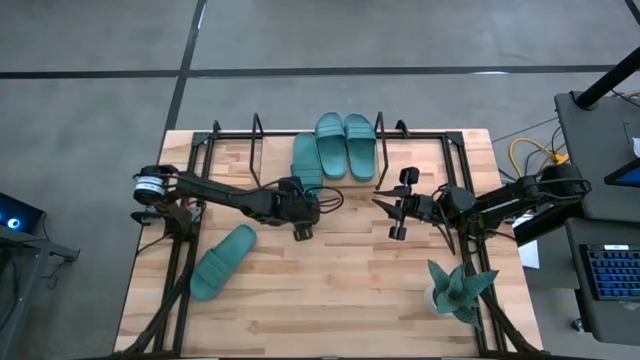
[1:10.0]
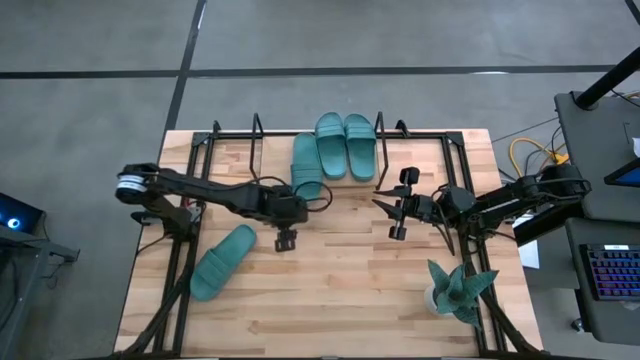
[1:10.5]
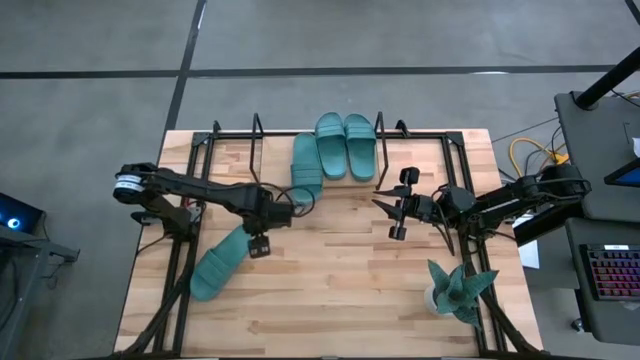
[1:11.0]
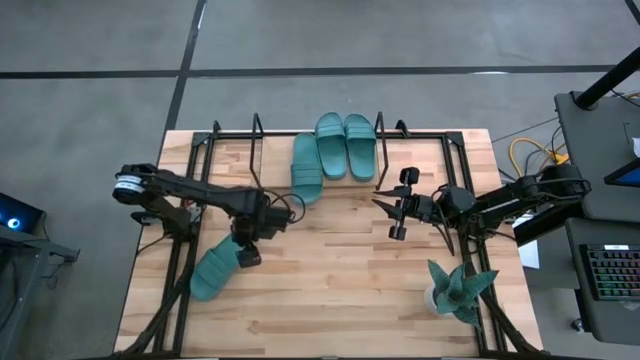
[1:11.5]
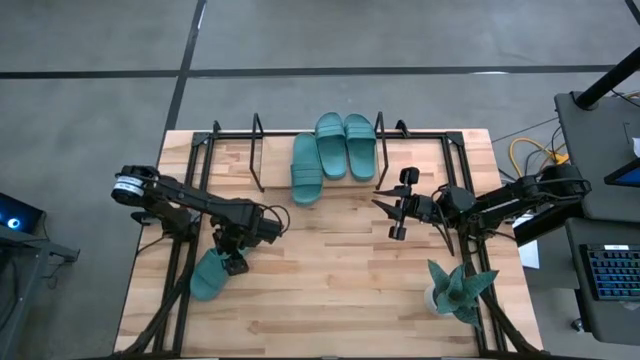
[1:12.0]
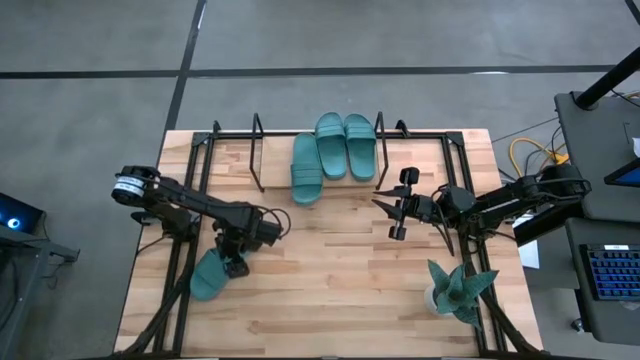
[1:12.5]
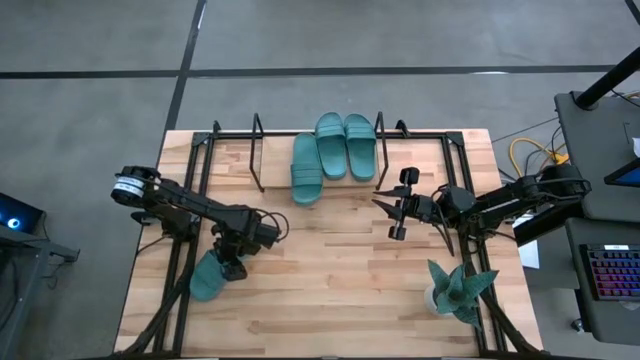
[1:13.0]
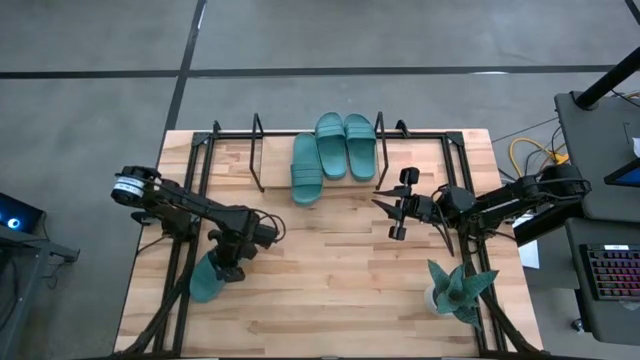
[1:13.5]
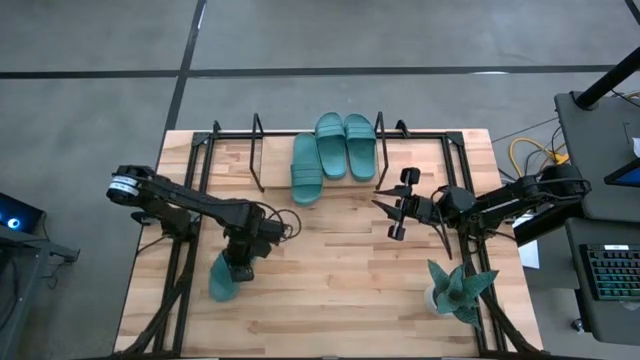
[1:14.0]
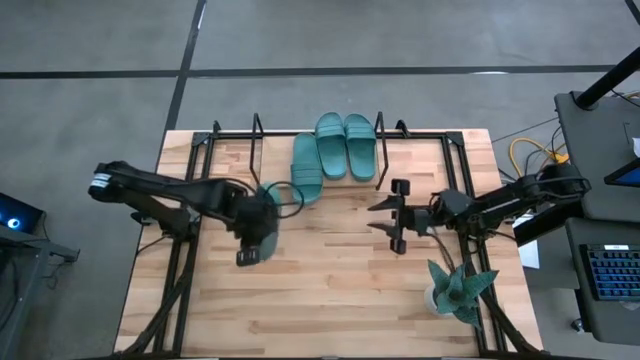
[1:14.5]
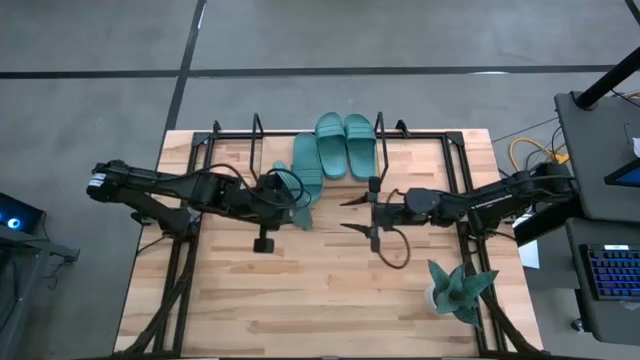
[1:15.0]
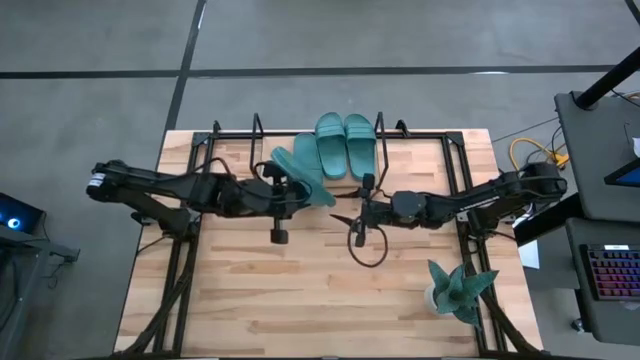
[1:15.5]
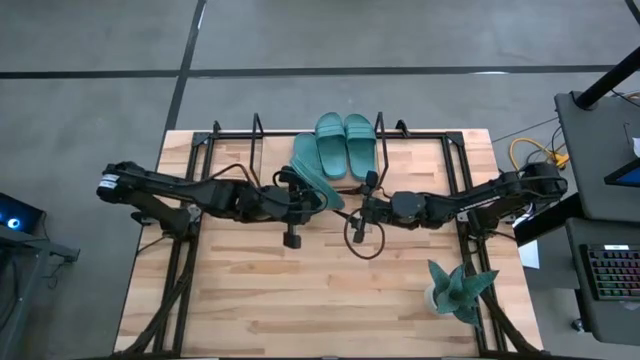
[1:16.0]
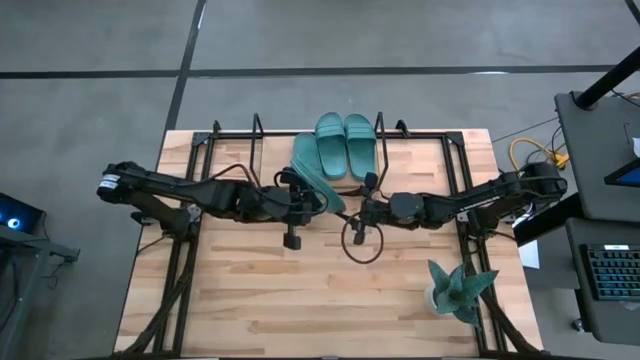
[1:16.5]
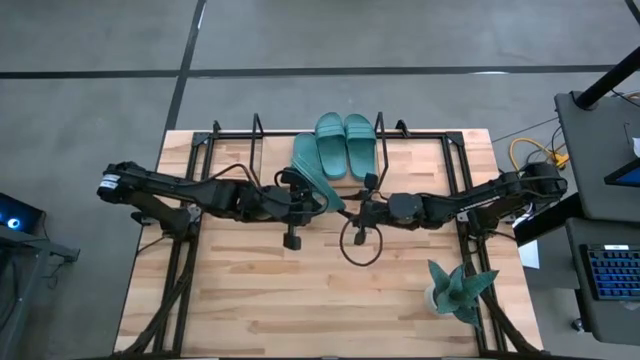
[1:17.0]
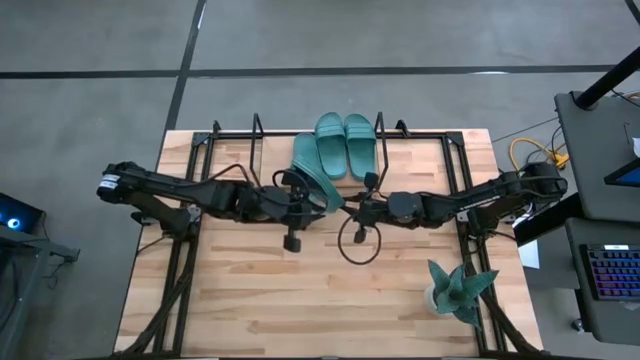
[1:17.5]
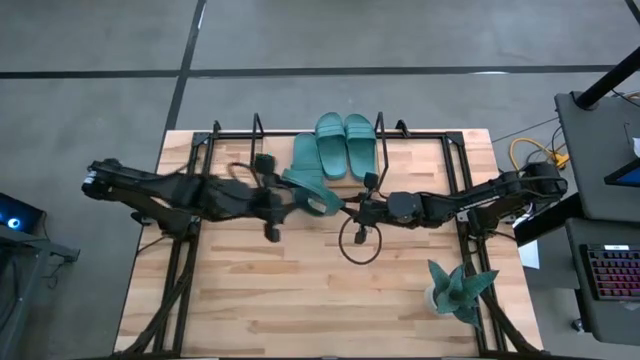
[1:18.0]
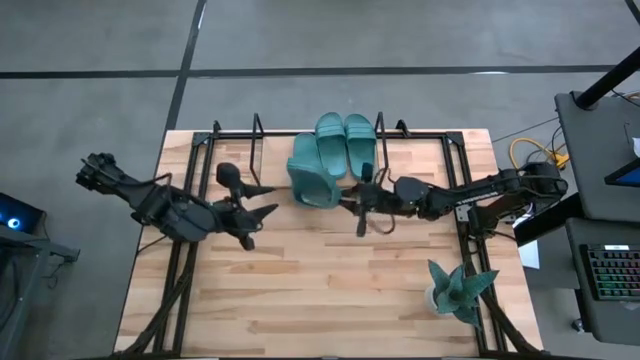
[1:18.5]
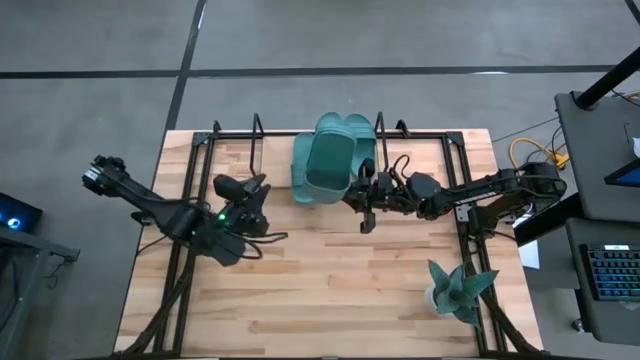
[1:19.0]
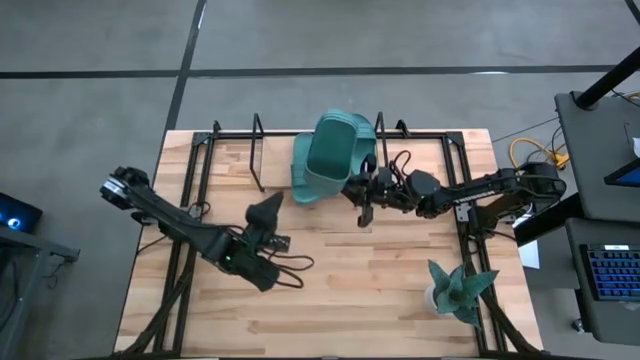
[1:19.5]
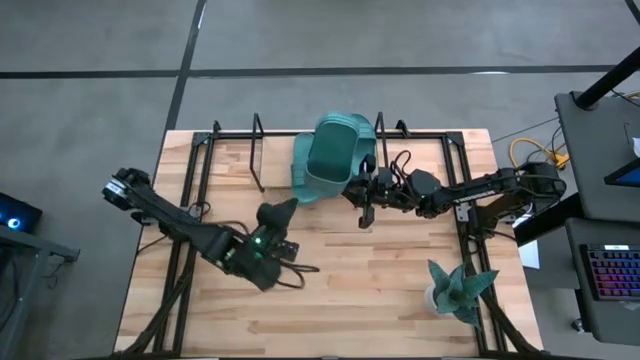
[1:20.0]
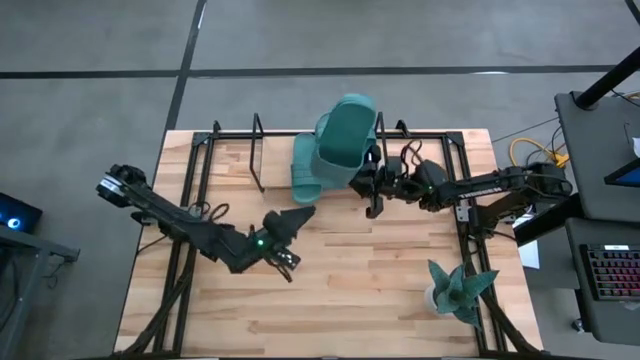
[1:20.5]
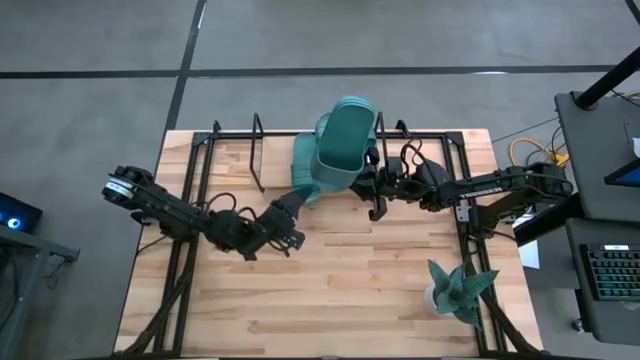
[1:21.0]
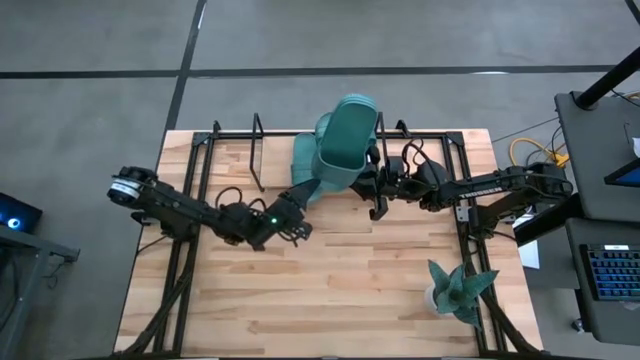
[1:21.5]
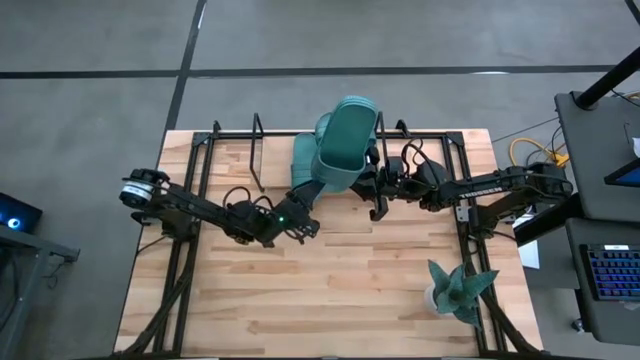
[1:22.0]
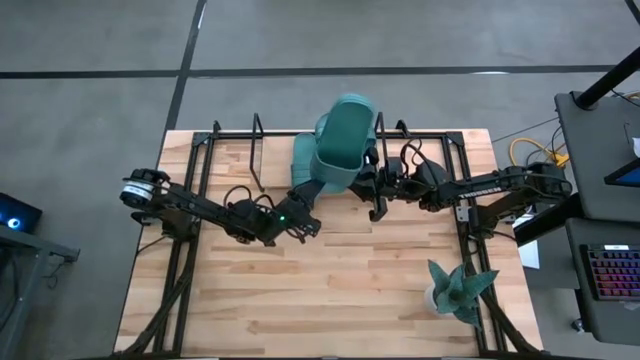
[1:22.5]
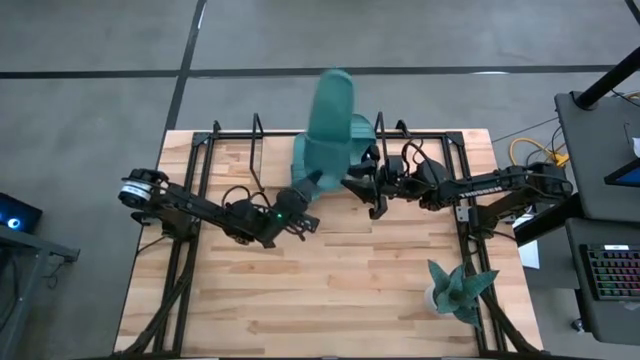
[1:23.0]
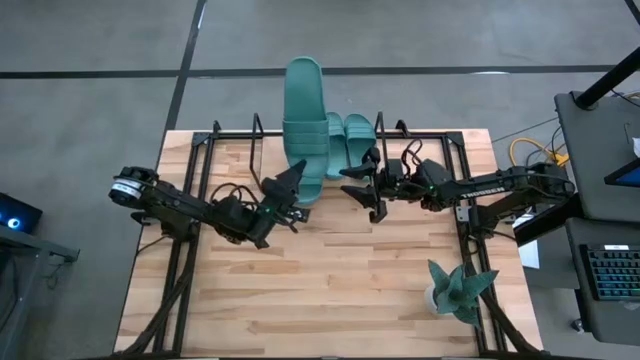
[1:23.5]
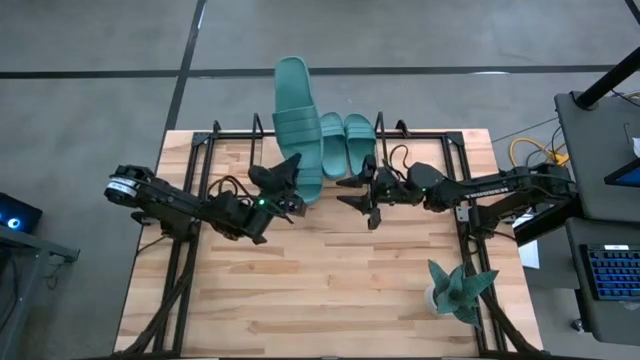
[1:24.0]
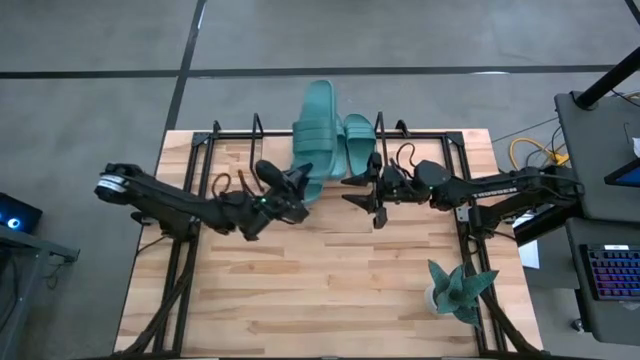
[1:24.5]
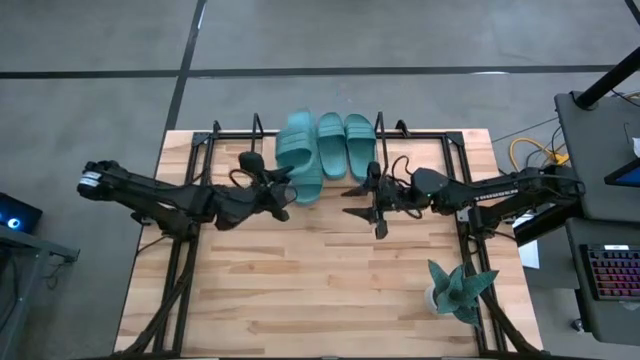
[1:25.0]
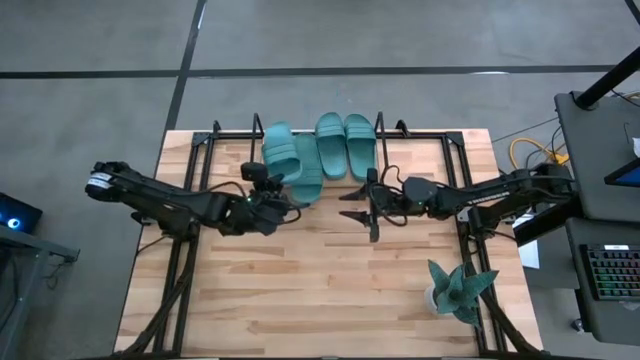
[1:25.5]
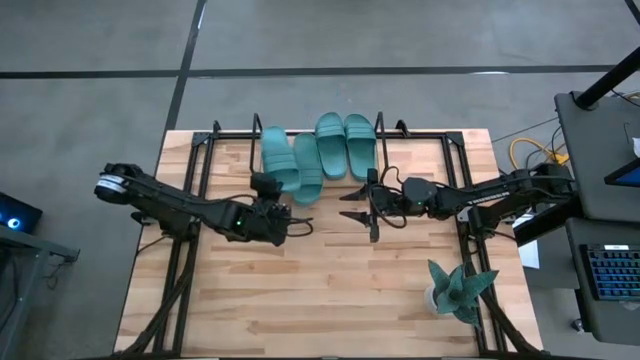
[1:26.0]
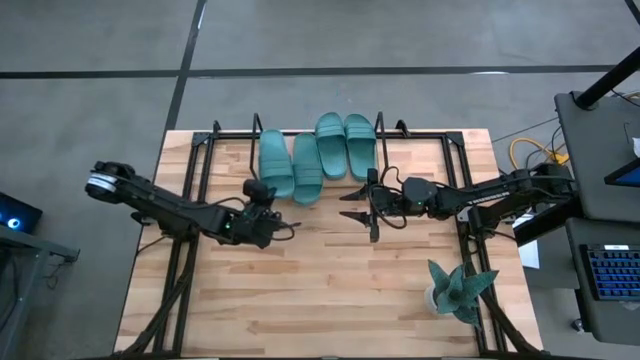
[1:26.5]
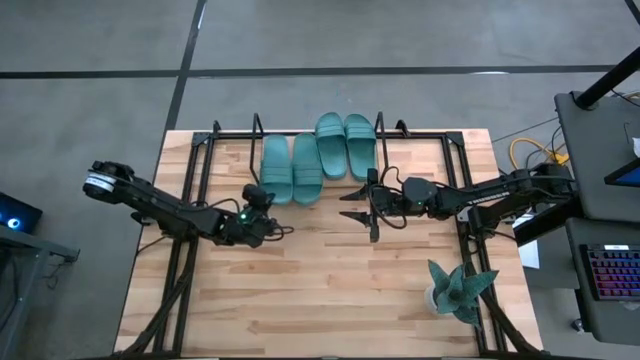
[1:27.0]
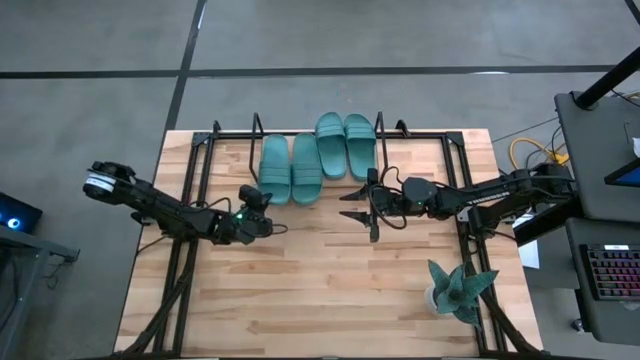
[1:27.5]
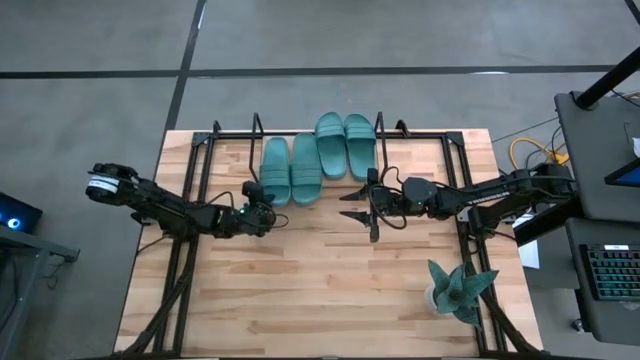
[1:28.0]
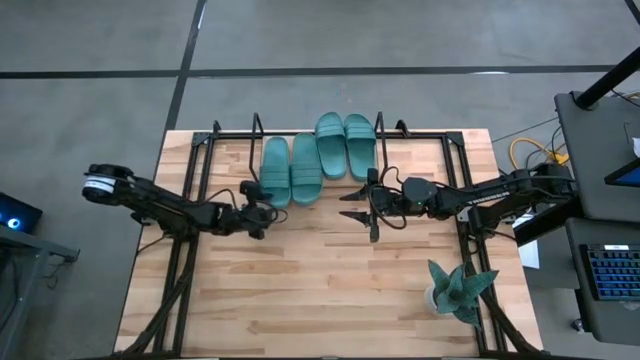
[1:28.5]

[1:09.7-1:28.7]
Task: Pick and place slides into the shelf
Put the blue slide on the shelf

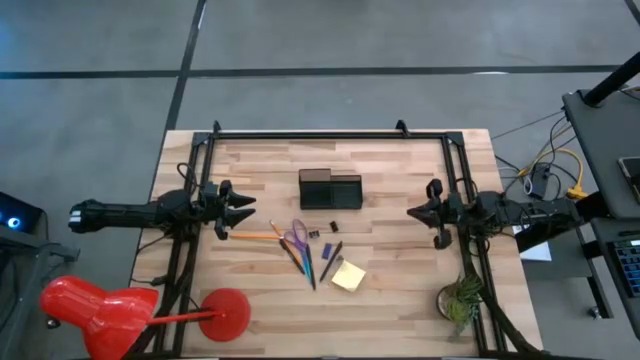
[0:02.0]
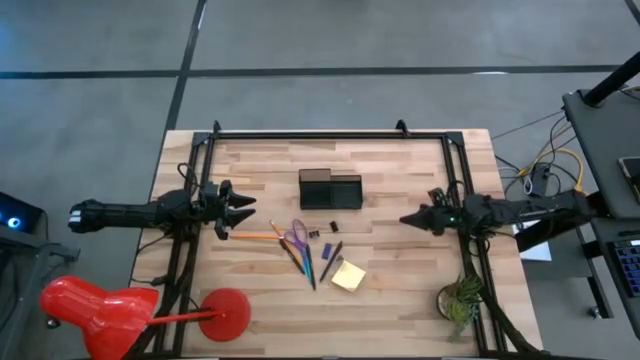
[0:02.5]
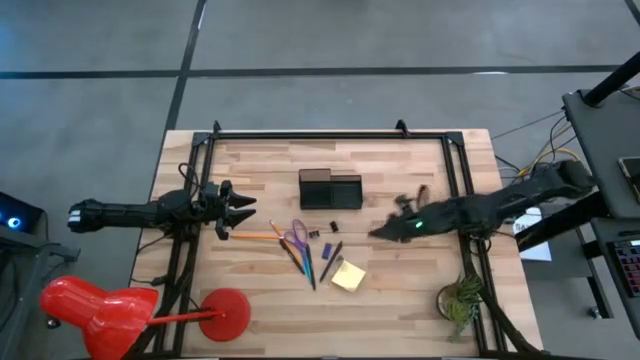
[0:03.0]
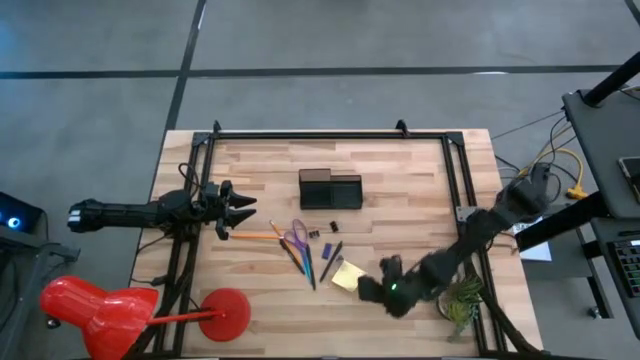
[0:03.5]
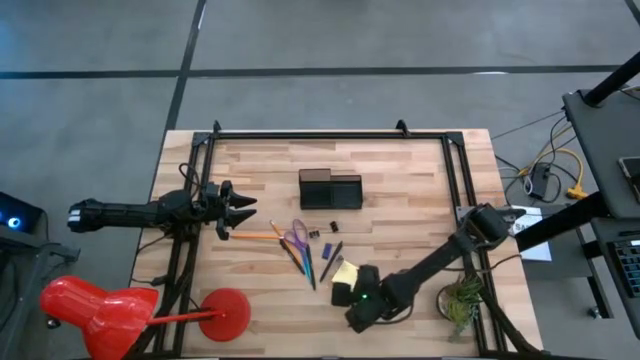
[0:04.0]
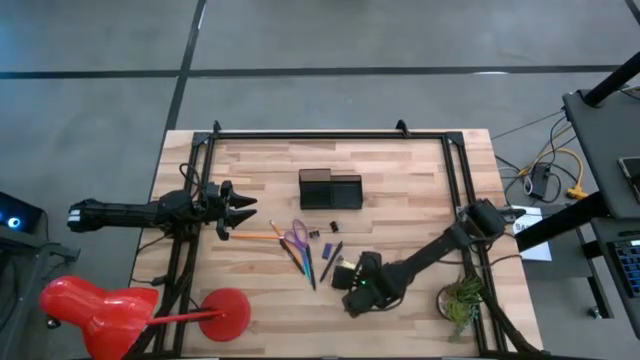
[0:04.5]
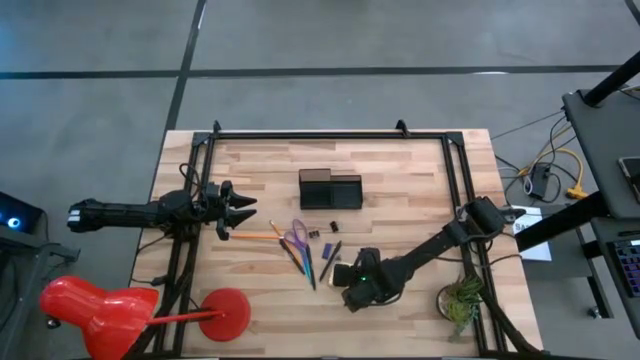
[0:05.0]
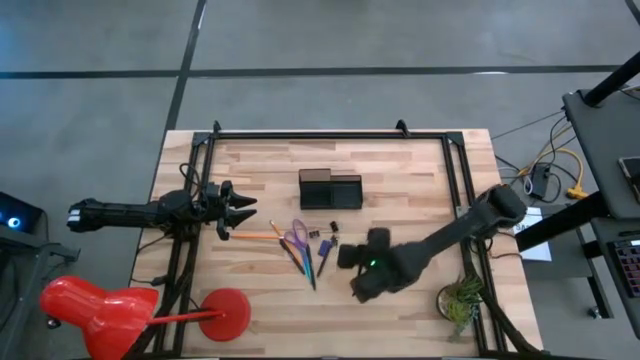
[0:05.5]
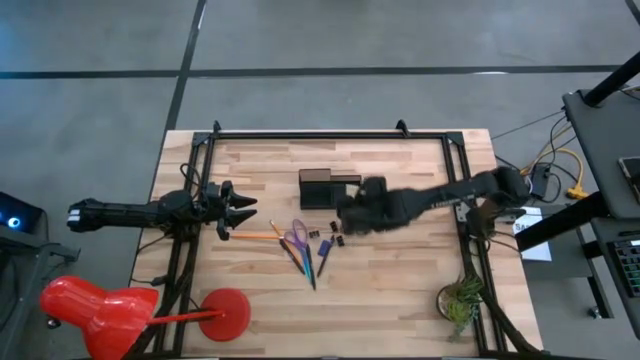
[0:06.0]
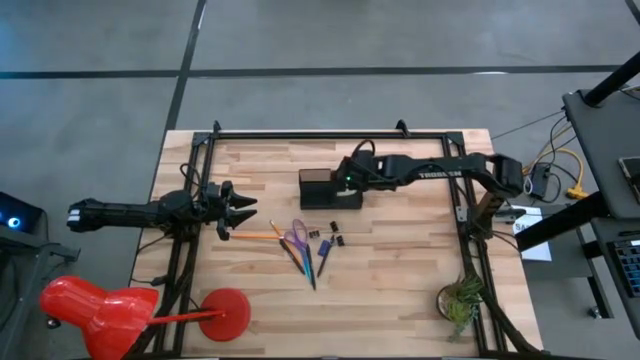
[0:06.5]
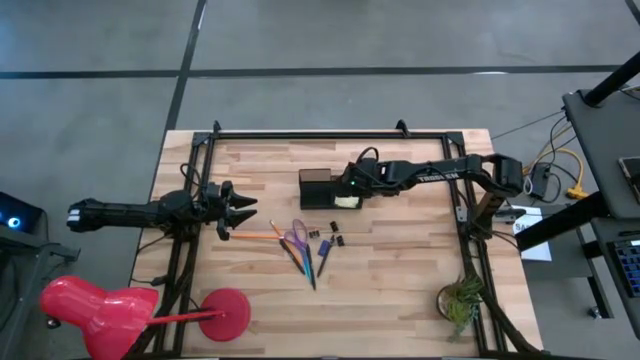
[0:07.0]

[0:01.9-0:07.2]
Task: Pick and place office supplies into organizer
Put the yellow sticky note into the black desk organizer
